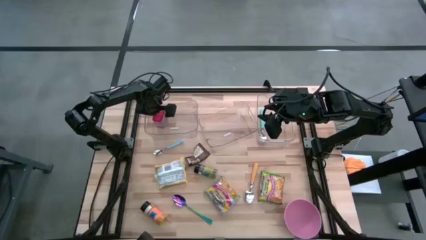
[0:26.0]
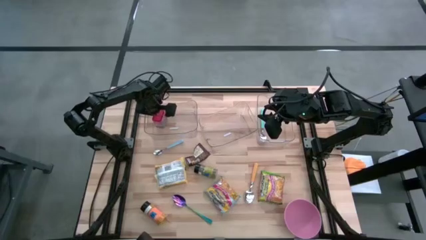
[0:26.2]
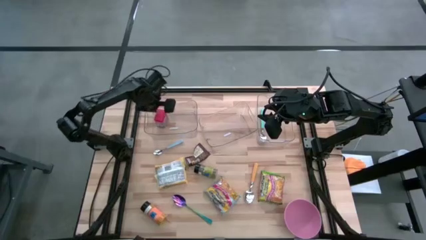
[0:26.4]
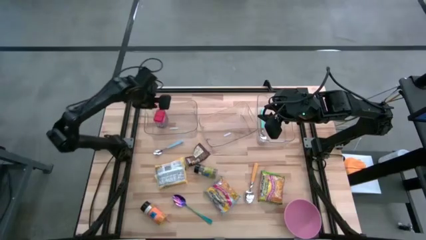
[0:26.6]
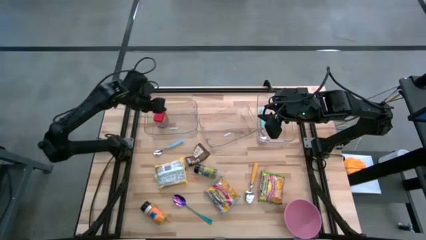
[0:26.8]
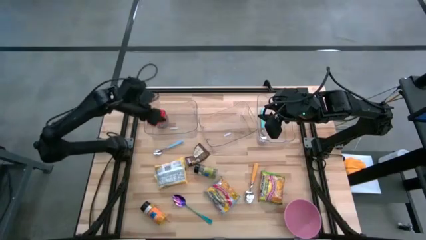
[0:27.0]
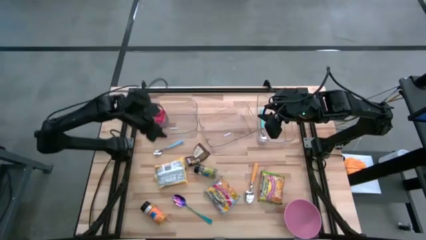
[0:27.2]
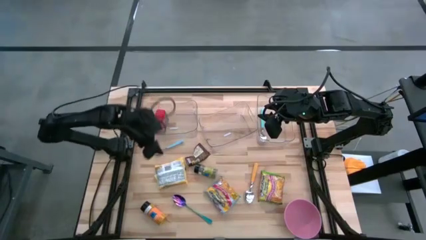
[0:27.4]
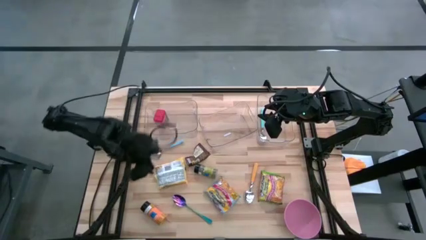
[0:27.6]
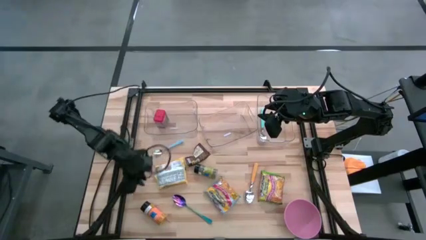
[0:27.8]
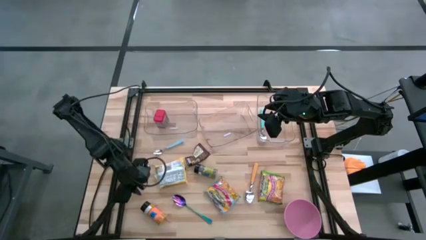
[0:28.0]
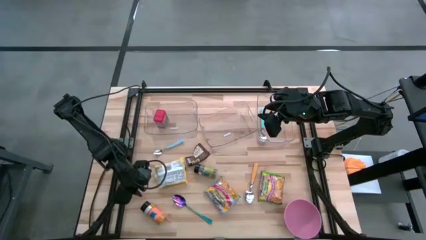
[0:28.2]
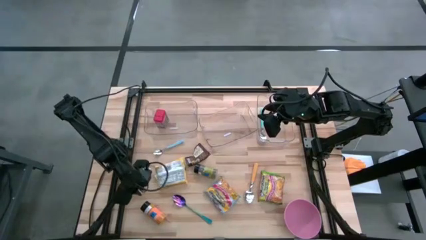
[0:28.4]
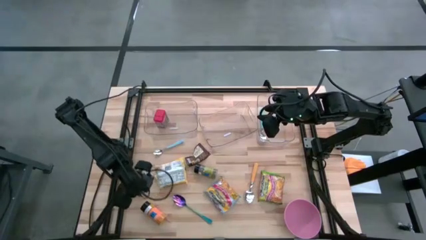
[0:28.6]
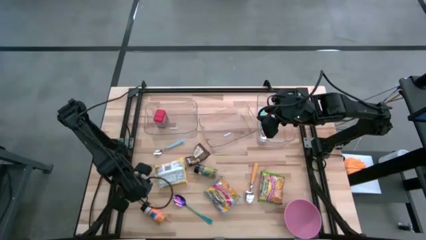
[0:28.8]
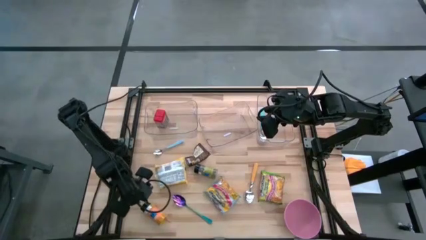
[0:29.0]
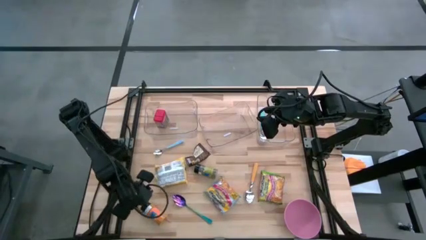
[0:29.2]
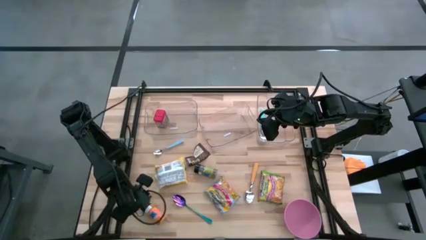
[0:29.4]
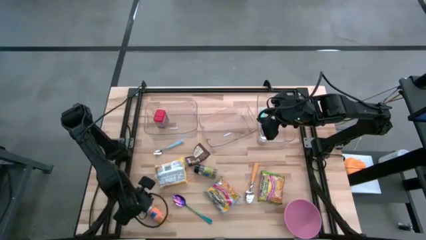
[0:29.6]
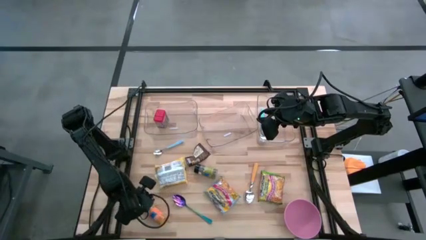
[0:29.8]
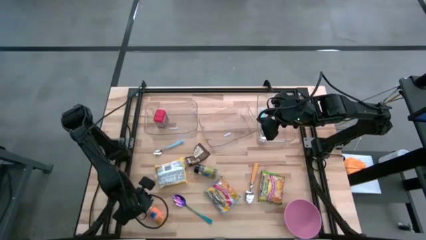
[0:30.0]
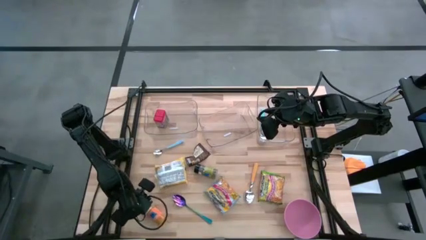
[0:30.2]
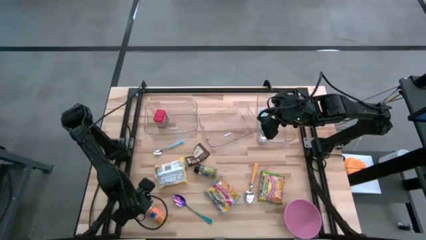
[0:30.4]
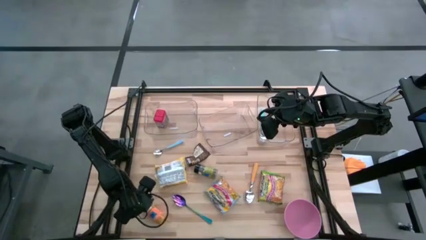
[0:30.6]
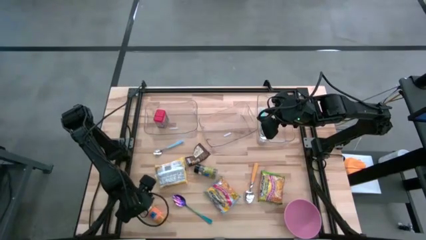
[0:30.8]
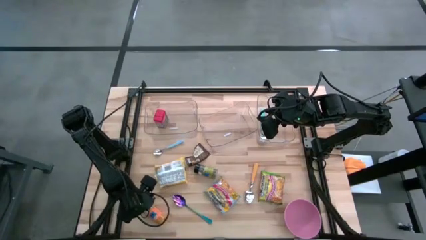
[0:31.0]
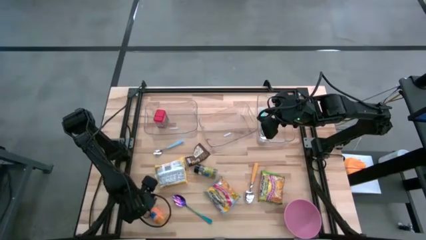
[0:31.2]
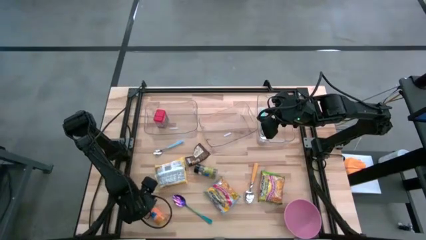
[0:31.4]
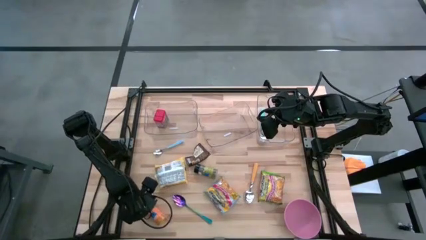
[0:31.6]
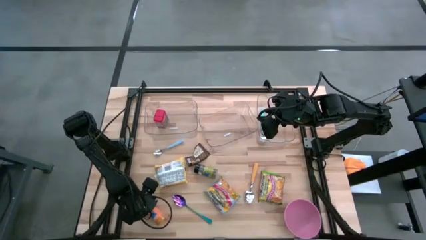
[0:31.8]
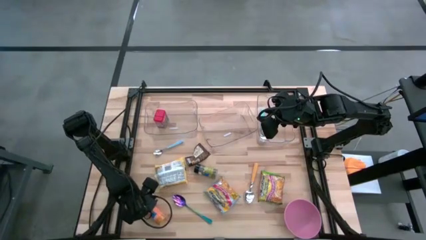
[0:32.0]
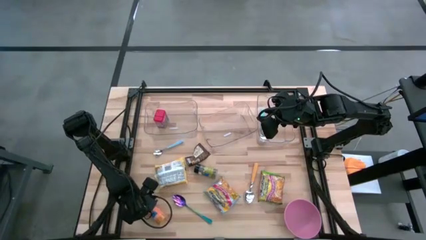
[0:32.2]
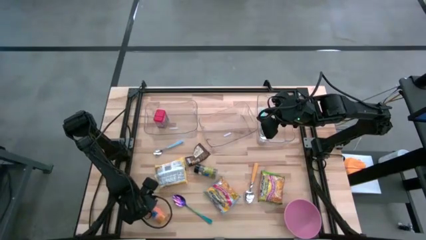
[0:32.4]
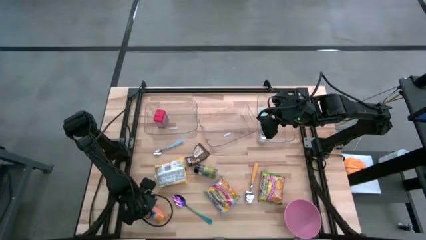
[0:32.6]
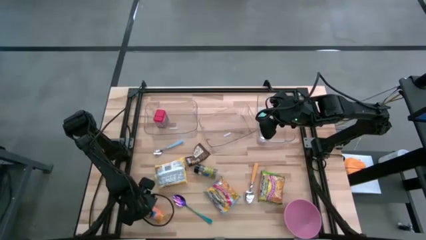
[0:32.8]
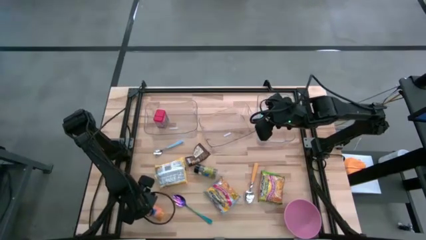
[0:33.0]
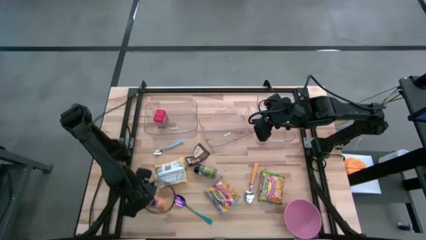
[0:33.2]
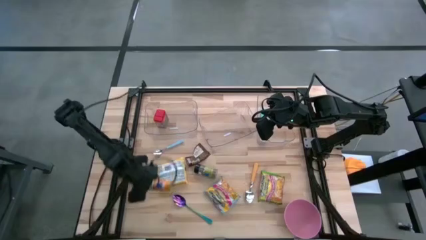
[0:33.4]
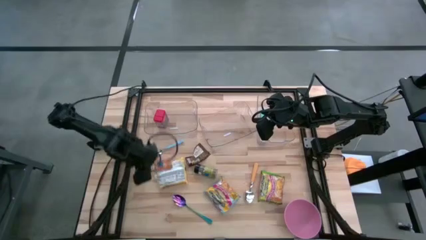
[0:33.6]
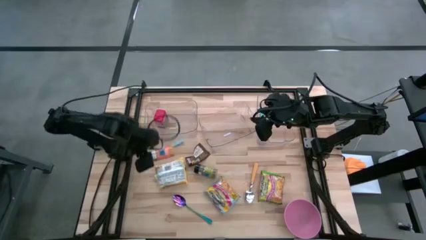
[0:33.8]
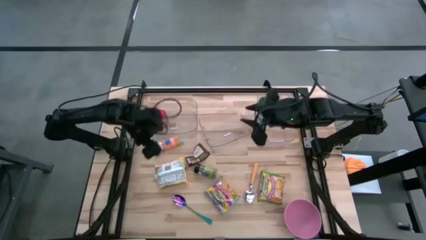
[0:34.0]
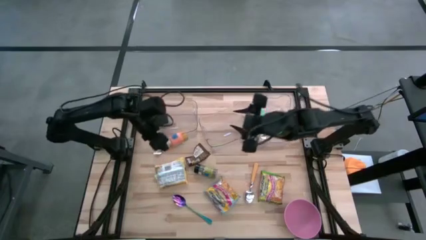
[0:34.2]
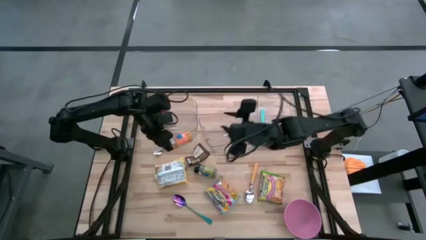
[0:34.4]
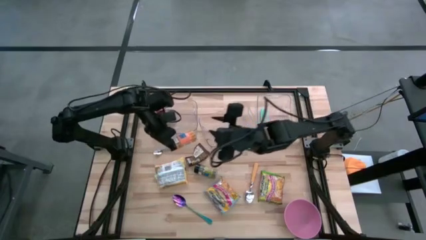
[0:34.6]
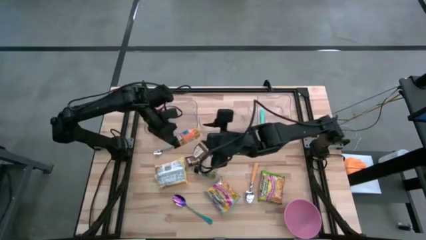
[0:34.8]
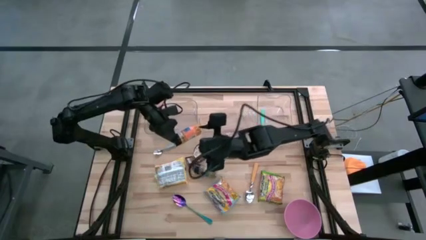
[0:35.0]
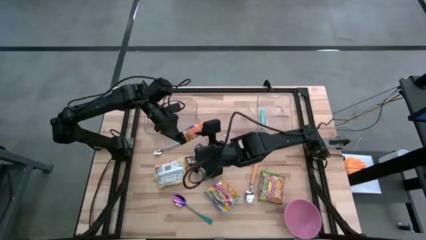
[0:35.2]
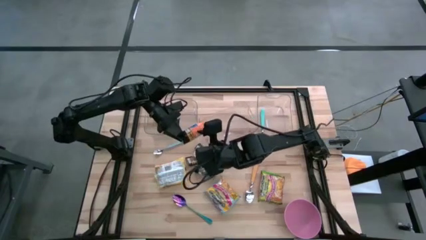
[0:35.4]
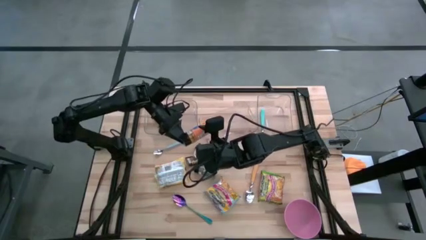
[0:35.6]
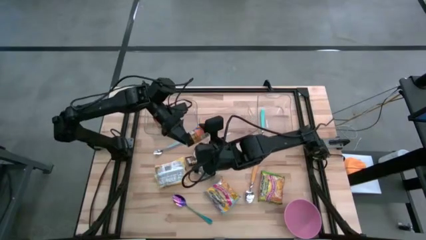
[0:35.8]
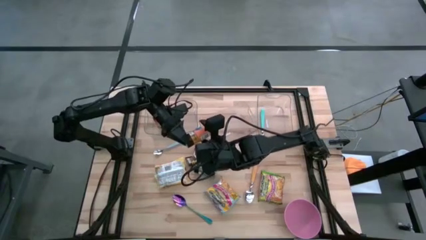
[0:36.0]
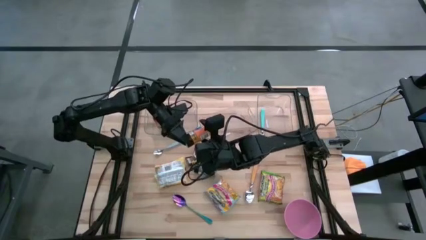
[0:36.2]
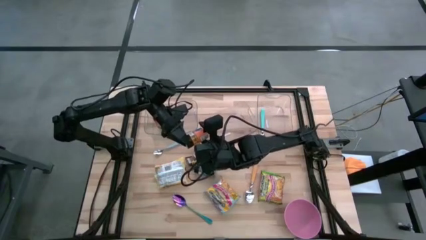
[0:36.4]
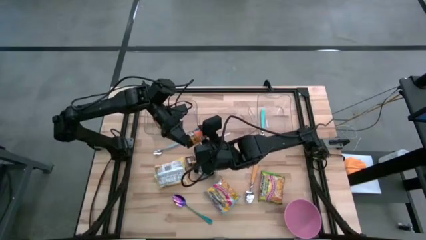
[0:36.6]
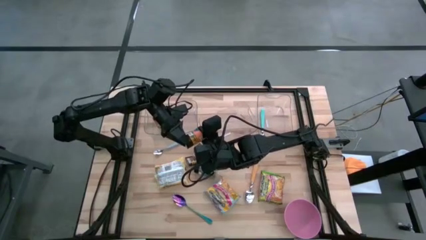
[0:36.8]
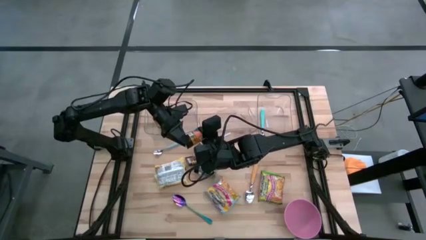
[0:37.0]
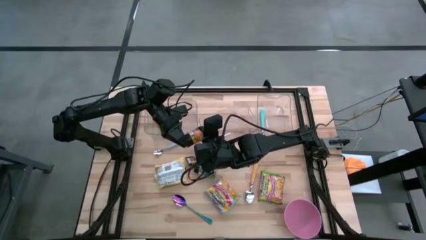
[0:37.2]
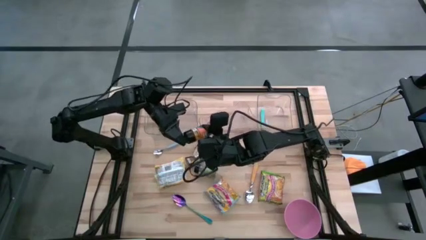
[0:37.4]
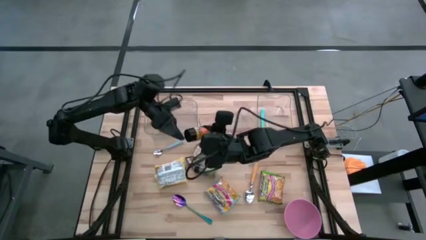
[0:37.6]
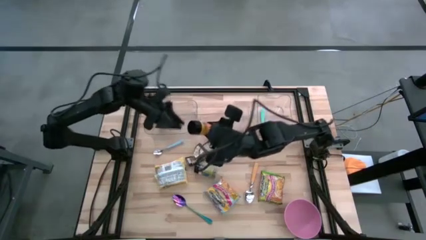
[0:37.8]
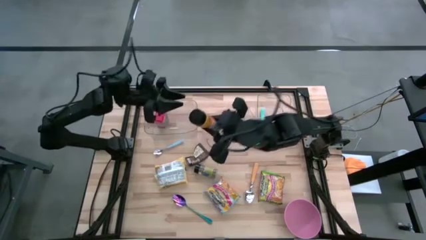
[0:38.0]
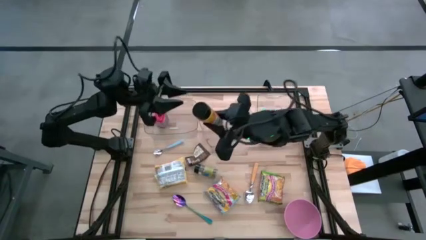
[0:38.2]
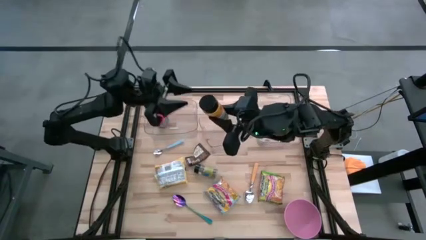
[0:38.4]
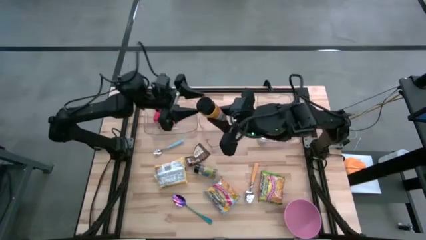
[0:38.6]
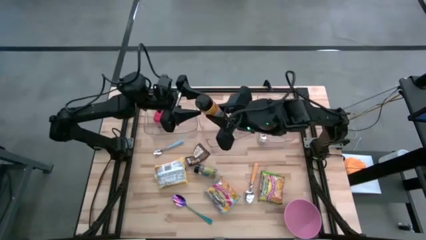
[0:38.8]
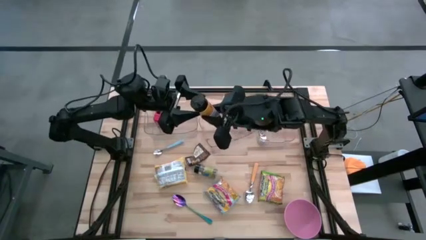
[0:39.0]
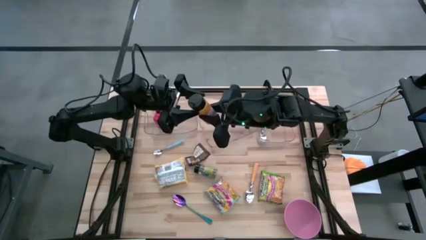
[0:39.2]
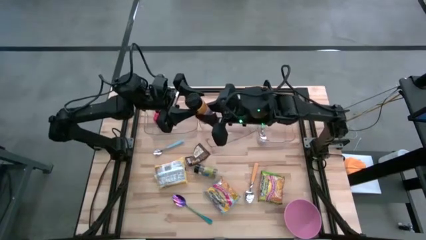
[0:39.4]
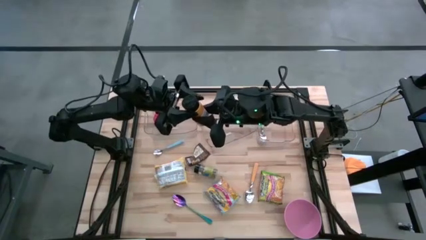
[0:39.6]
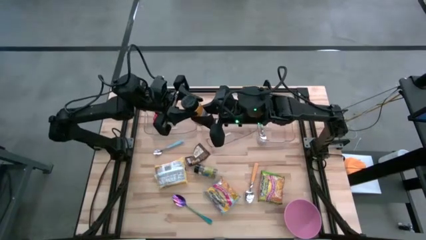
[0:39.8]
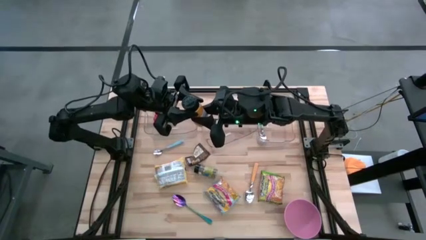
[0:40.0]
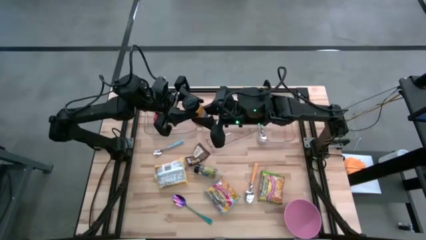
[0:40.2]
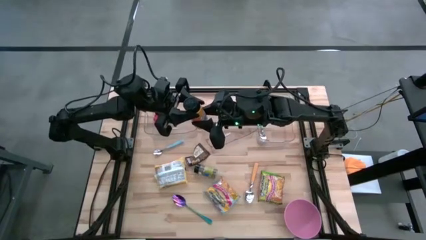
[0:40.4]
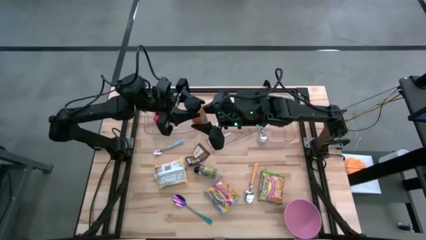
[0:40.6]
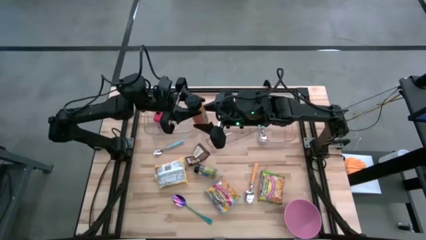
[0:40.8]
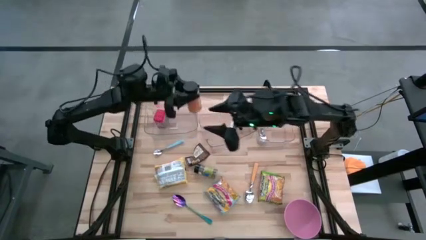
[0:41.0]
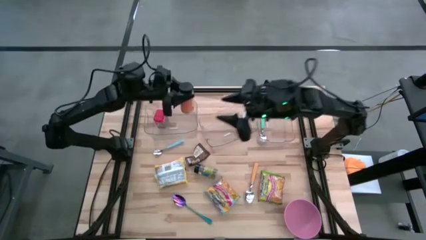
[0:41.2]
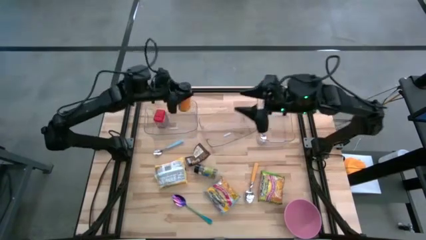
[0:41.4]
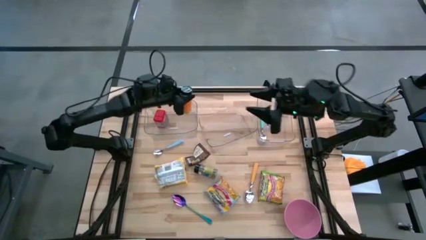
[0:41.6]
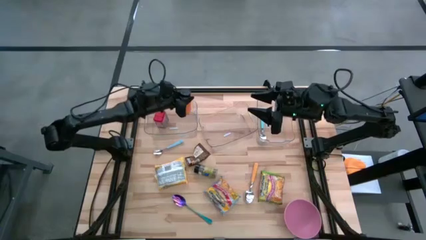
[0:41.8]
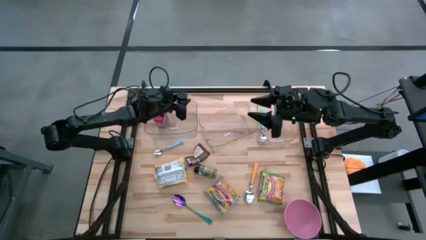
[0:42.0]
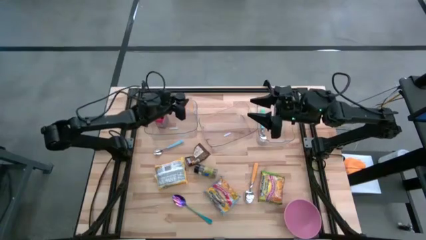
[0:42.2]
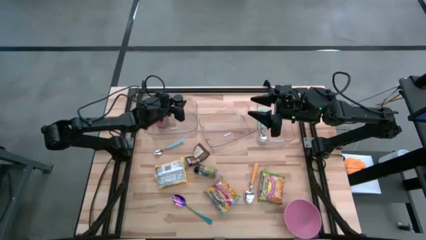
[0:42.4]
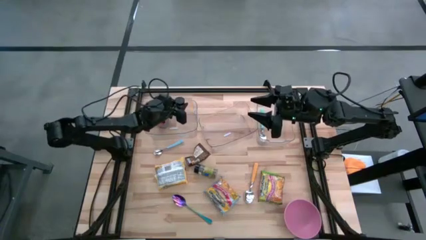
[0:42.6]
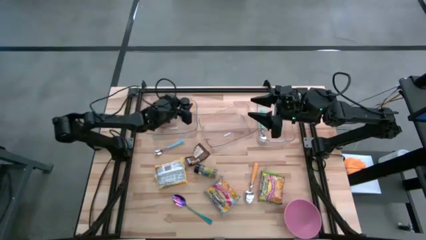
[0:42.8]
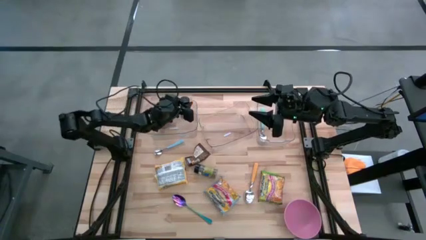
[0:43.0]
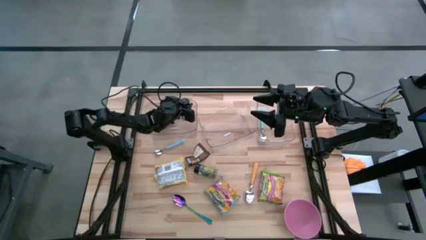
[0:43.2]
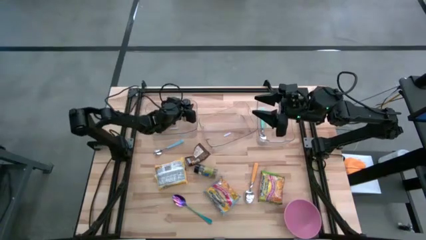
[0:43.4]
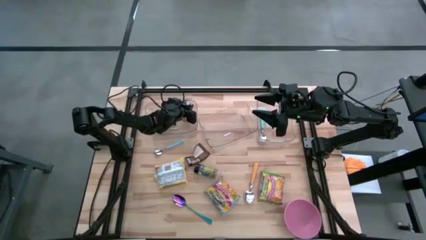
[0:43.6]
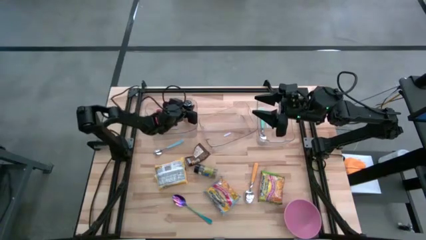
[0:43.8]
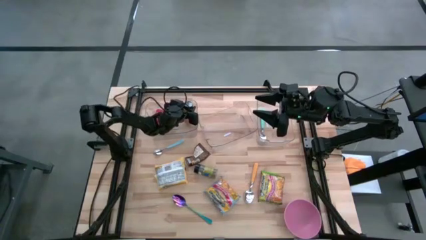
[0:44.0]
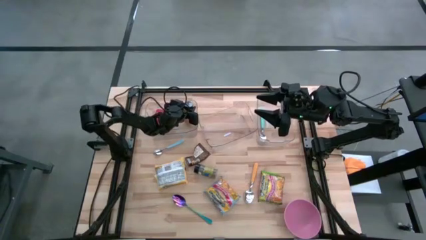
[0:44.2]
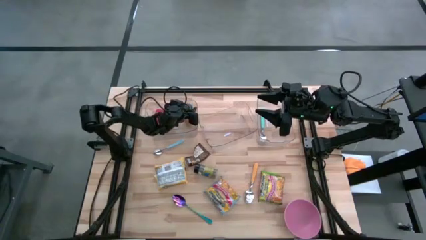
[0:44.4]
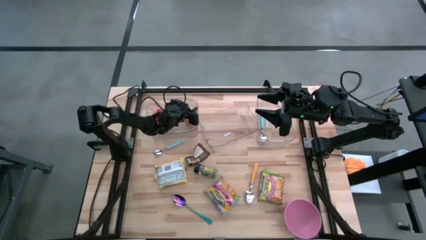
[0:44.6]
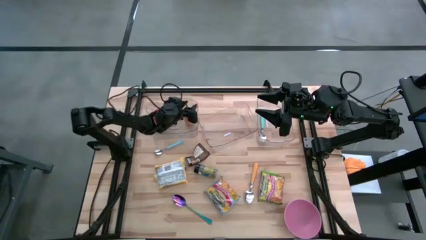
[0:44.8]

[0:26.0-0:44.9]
Task: Pick & Place Food Item
Put the orange seasoning bottle into the left transparent bin
